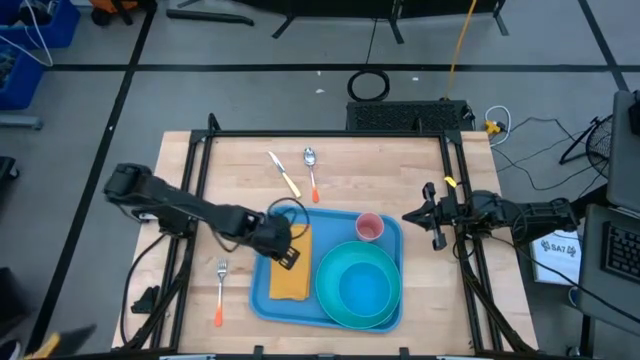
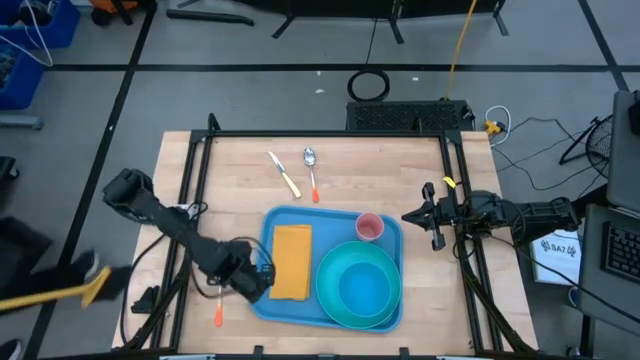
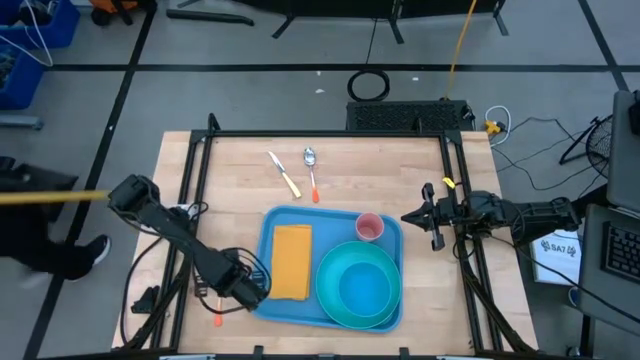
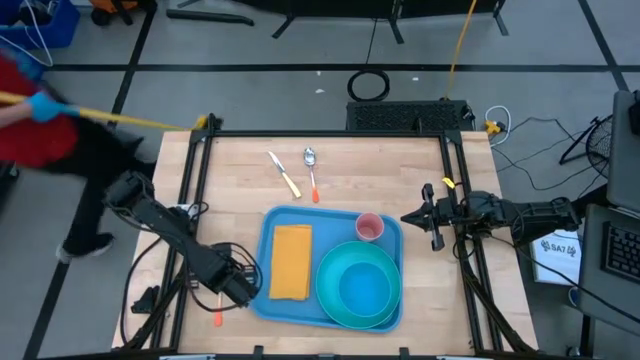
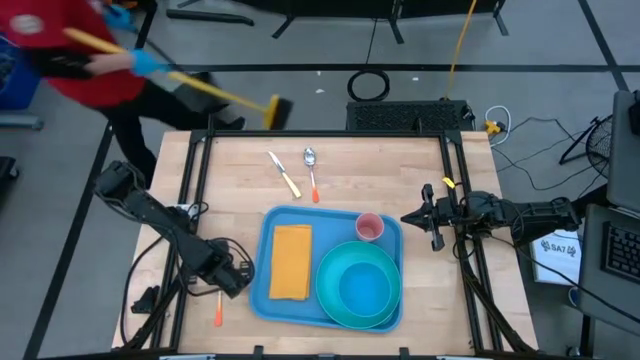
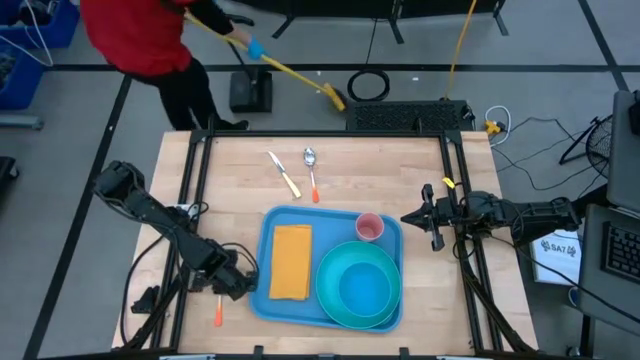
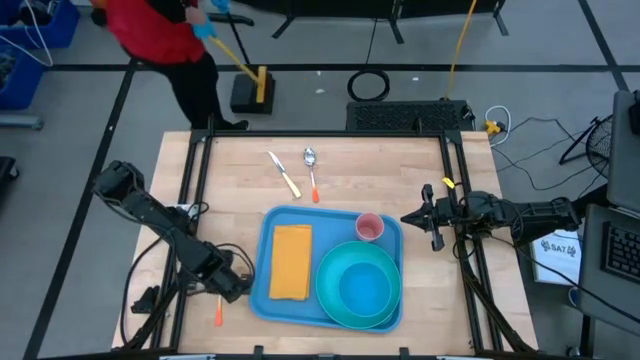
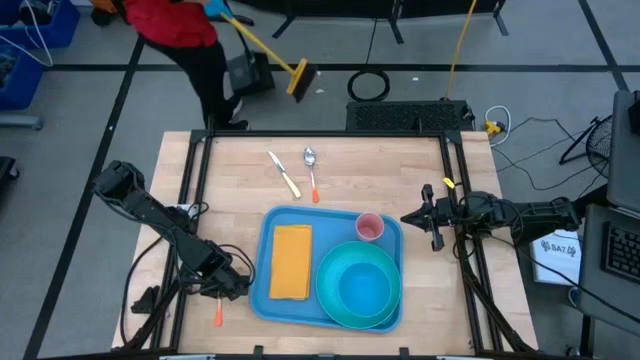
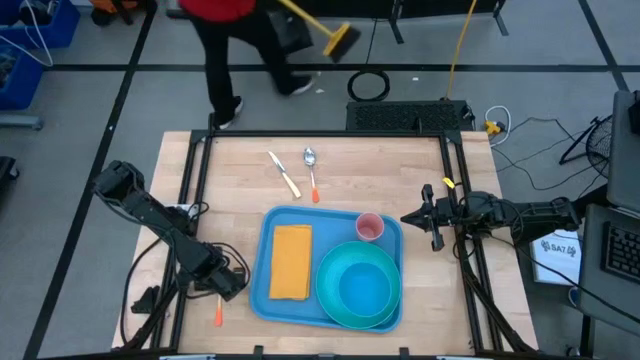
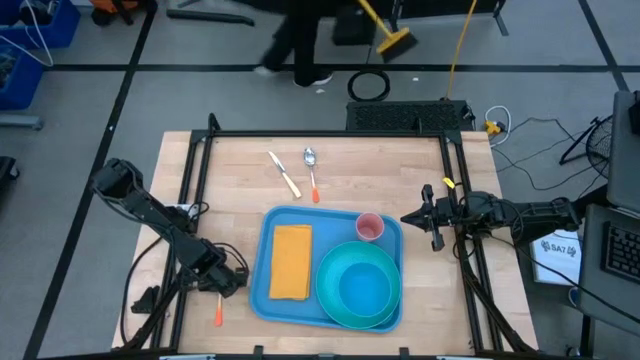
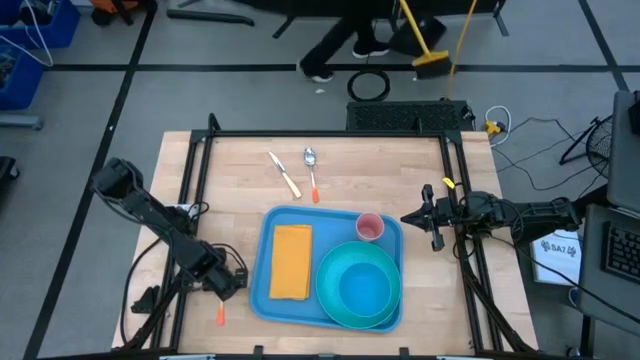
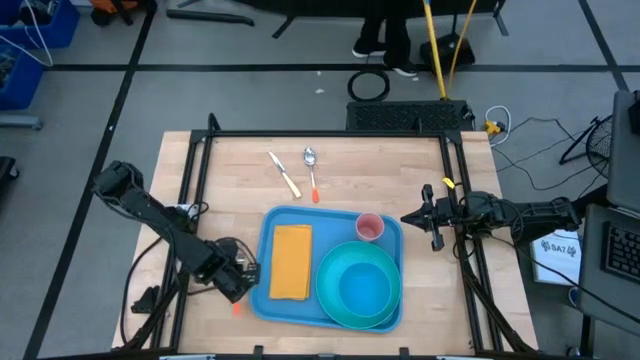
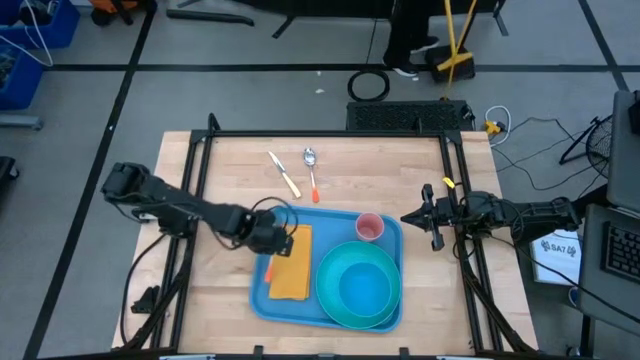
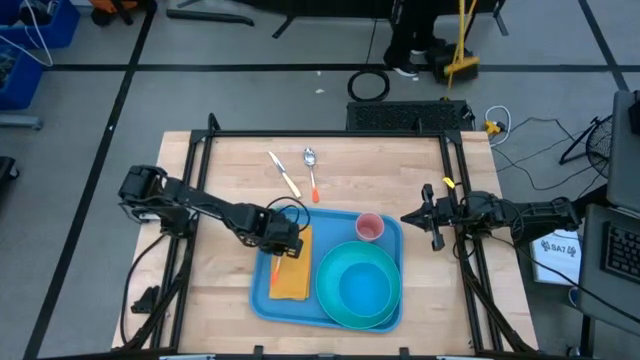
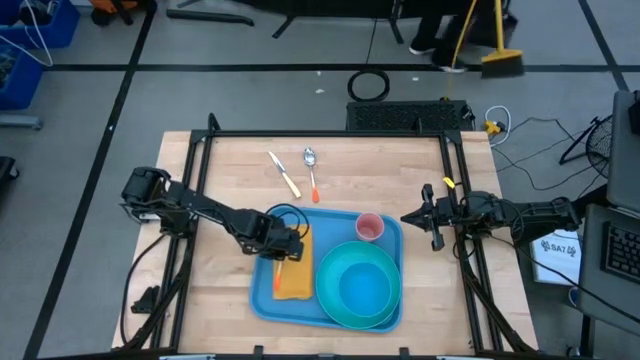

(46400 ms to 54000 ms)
Task: Set up tray
Put the orange fork on top of the yellow napkin

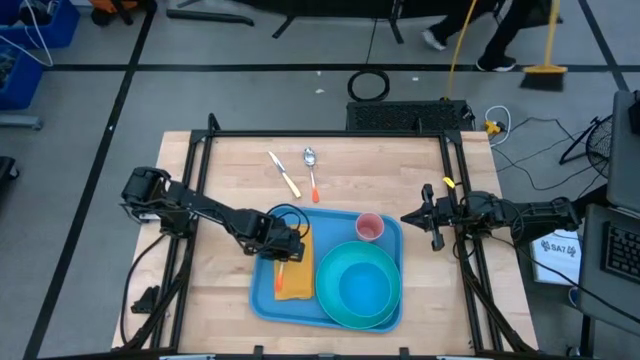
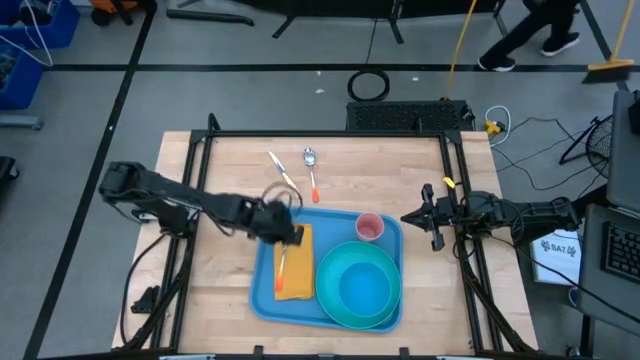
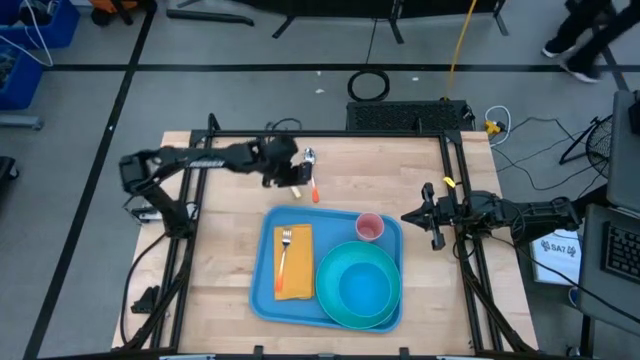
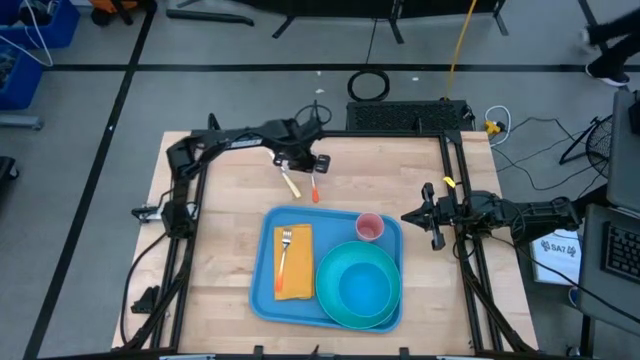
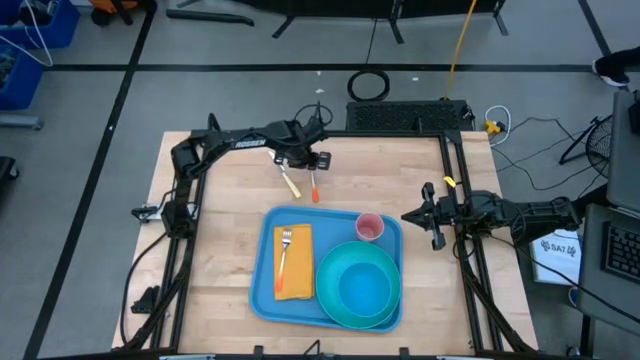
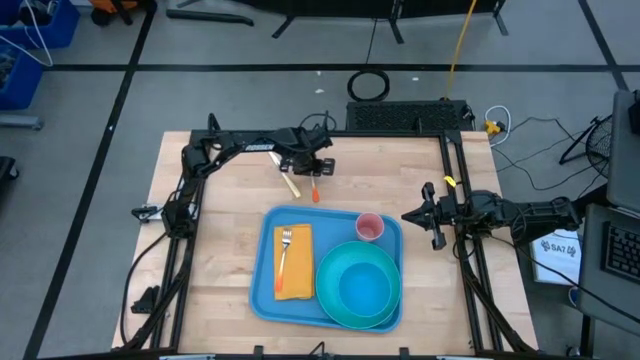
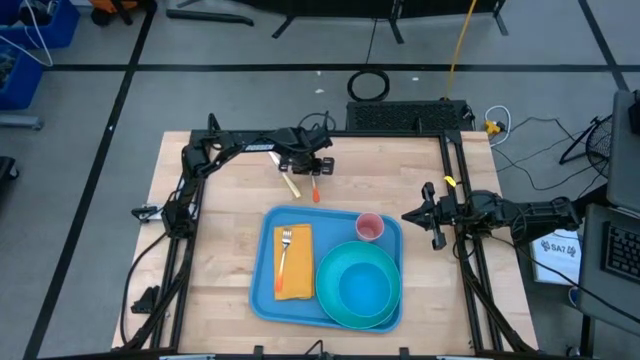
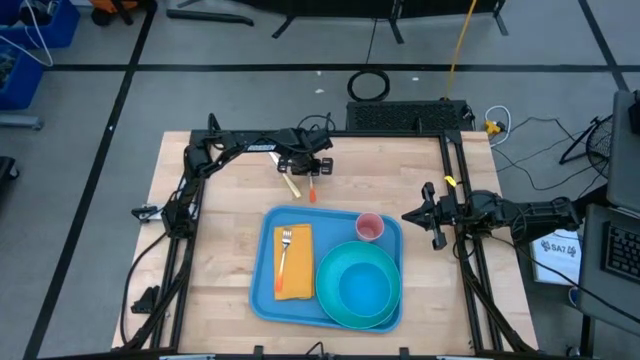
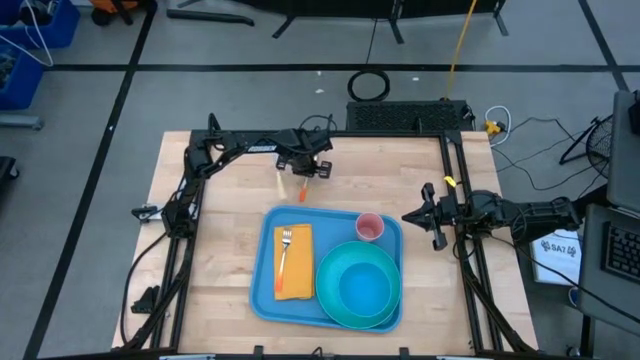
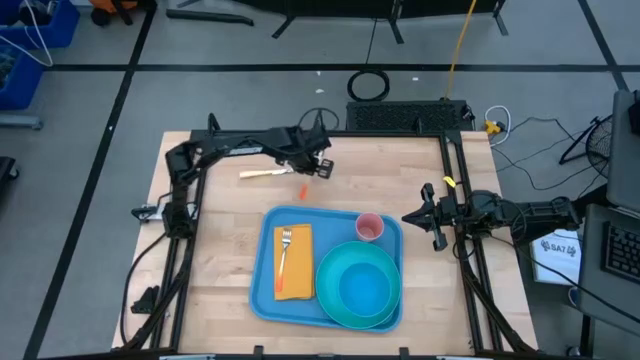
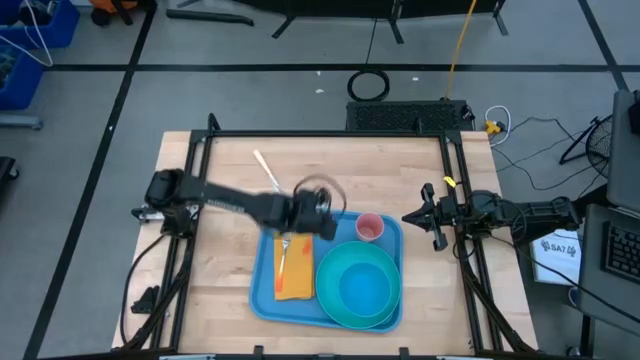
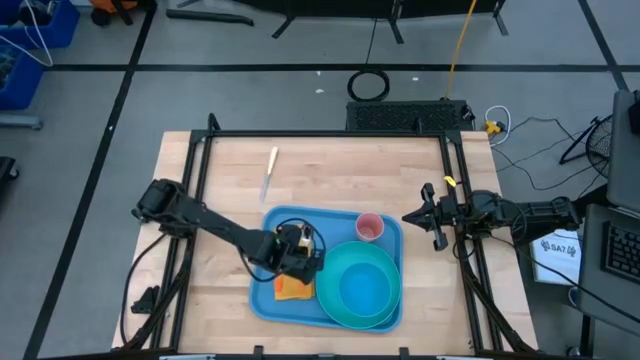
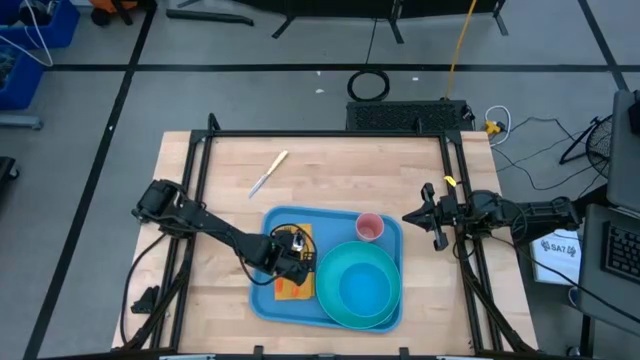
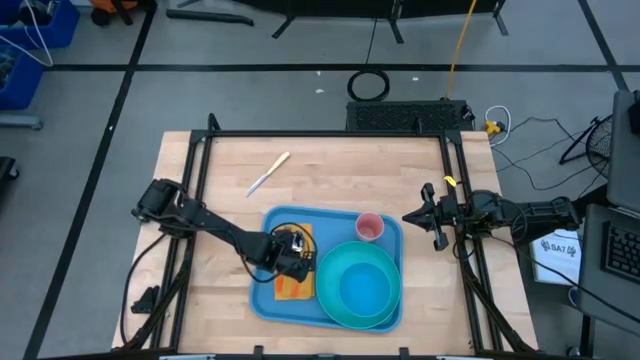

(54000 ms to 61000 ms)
Put the orange spoon on top of the yellow napkin to the right of the orange fork

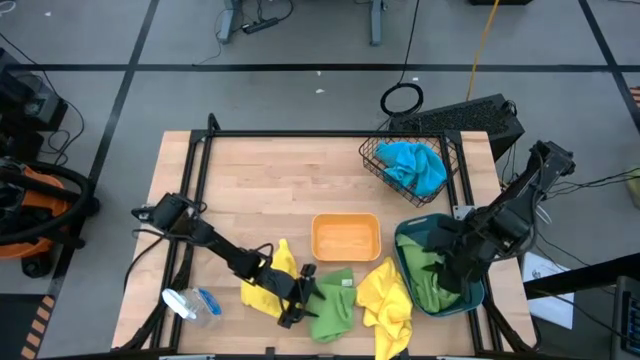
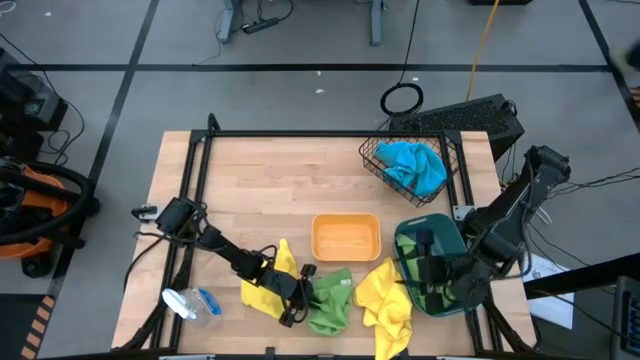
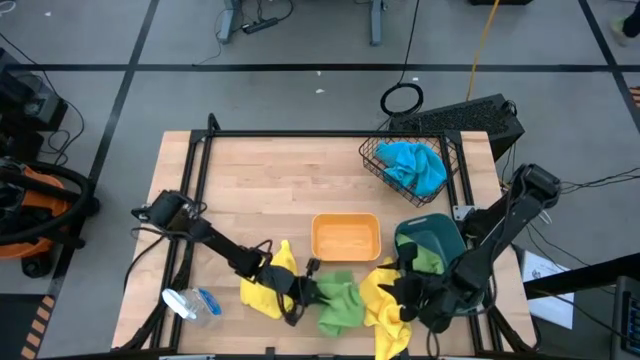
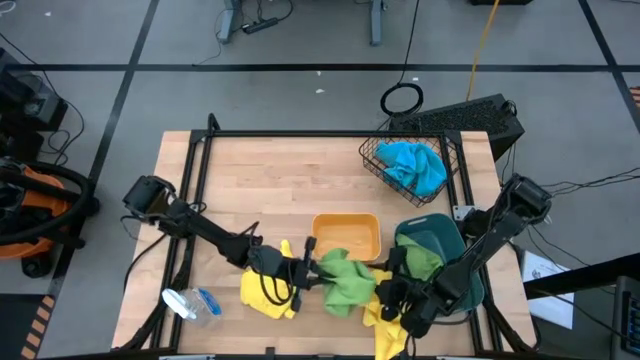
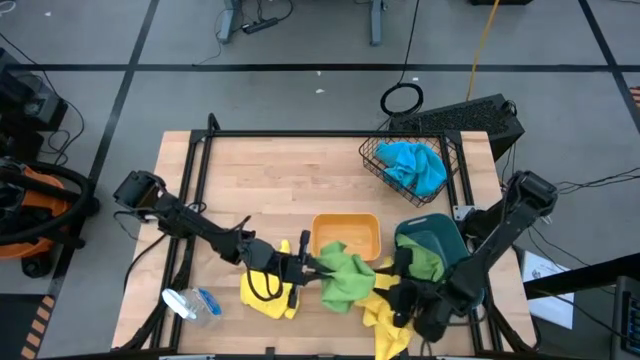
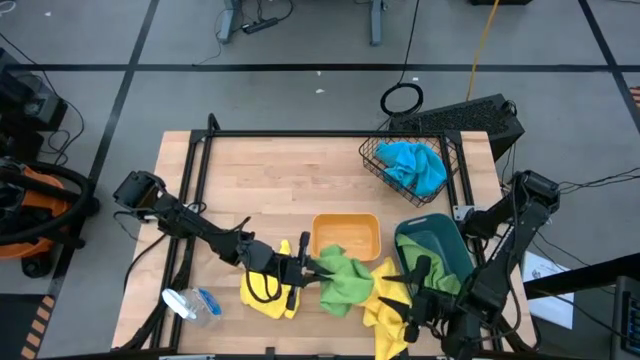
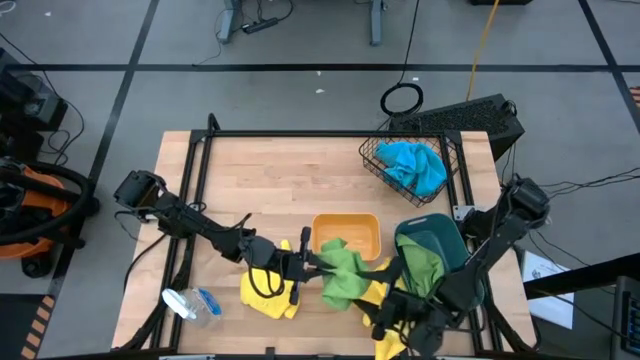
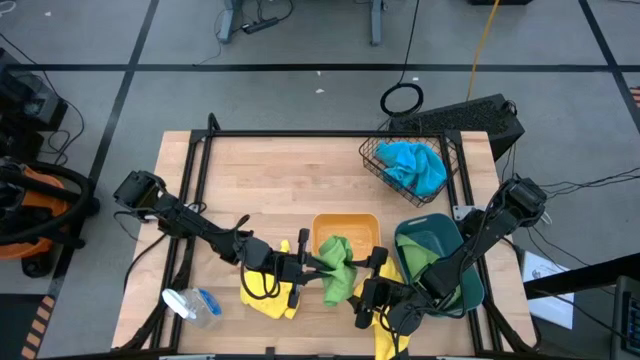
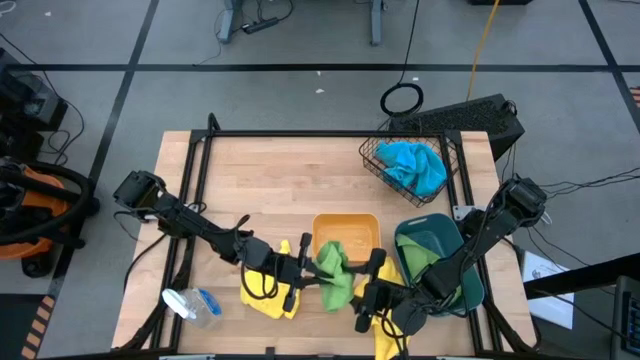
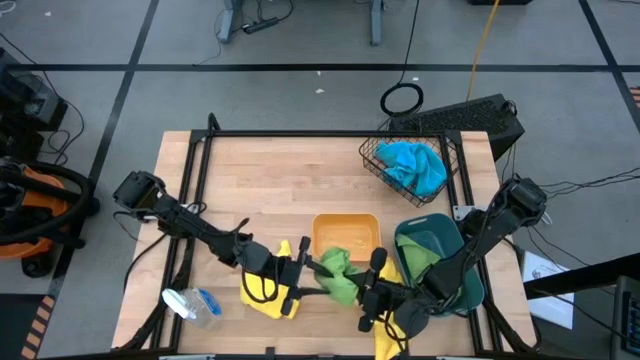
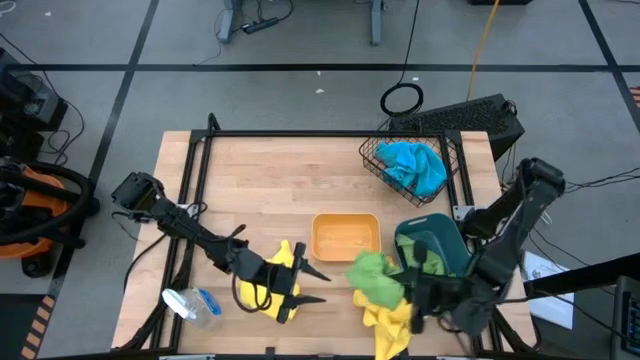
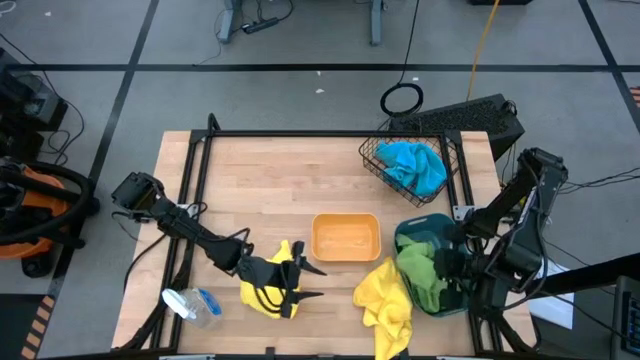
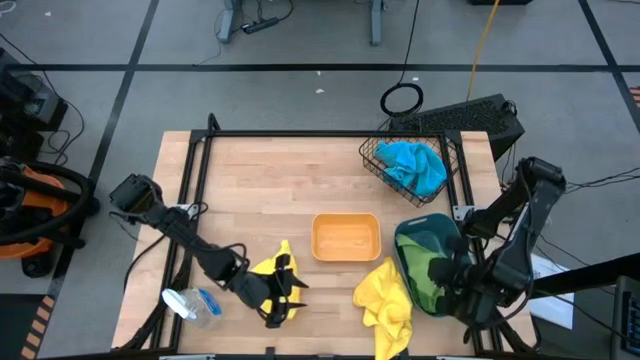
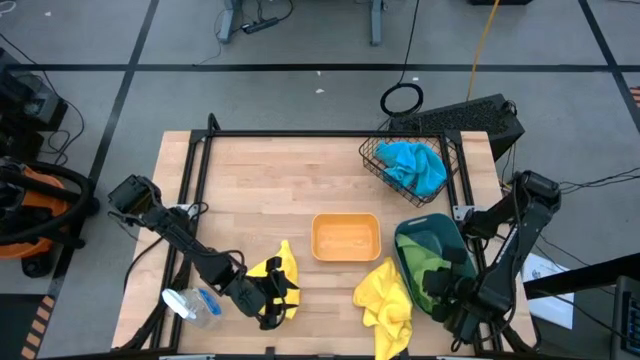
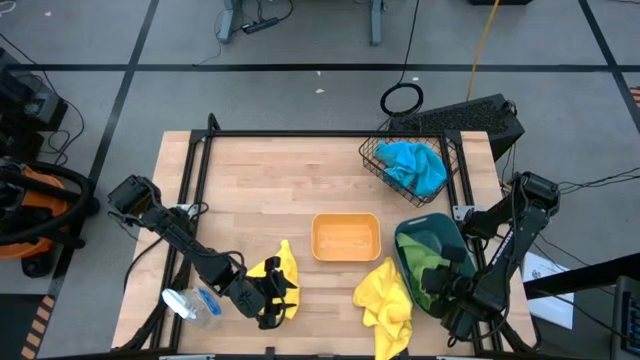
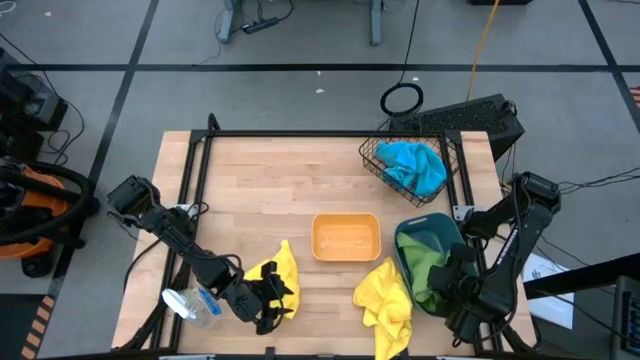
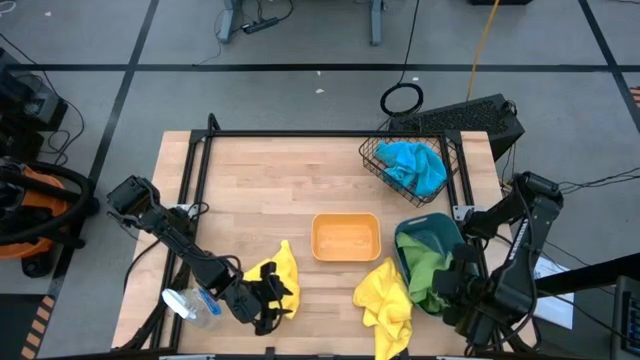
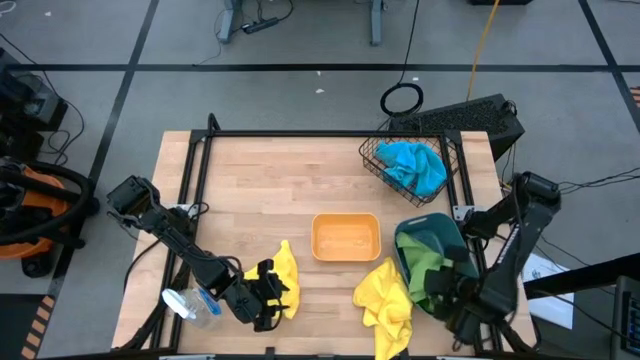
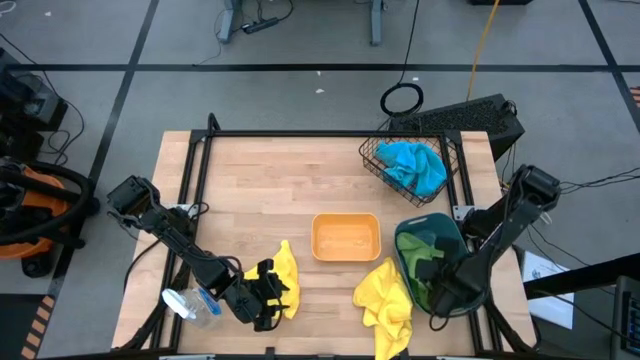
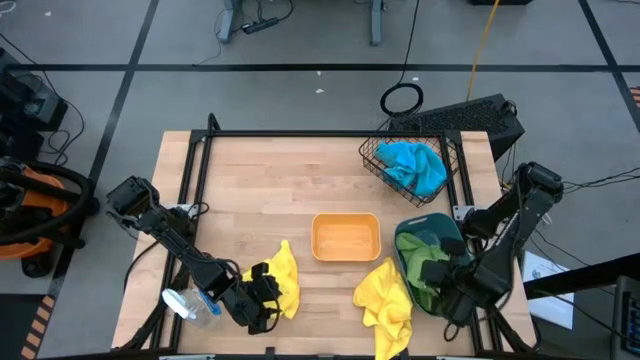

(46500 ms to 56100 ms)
Task: Sort microfiber towel by color & place in baskets
Put the green microfiber cloth into the blue bin
